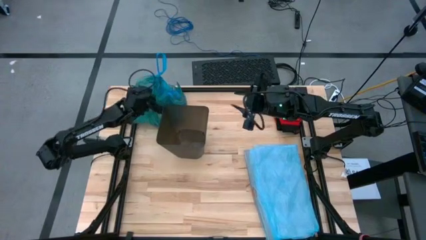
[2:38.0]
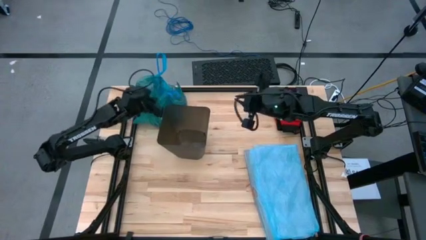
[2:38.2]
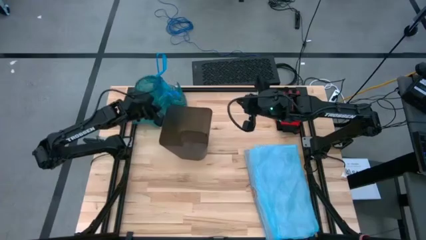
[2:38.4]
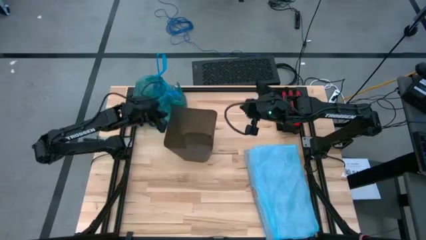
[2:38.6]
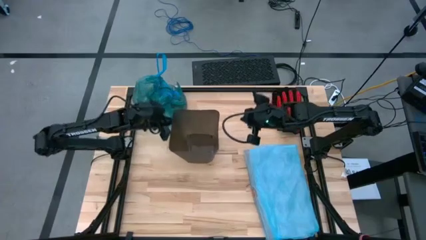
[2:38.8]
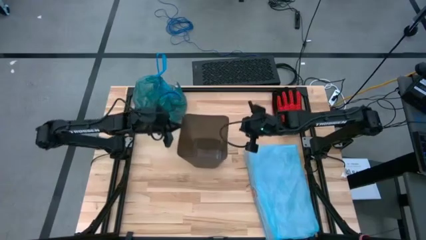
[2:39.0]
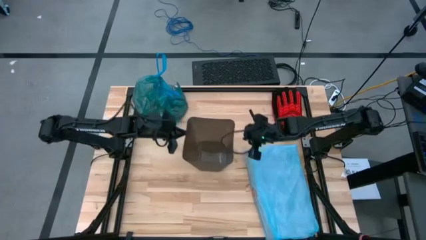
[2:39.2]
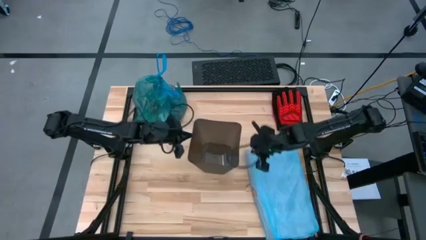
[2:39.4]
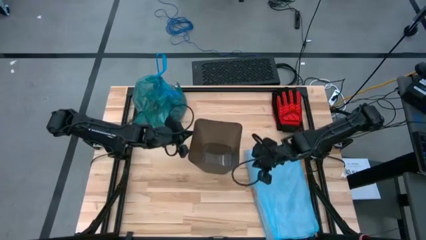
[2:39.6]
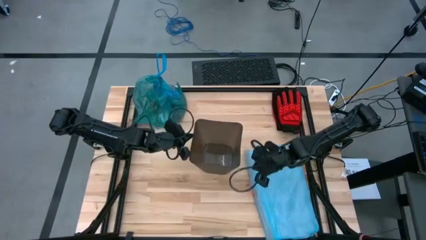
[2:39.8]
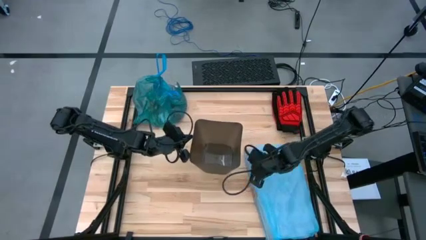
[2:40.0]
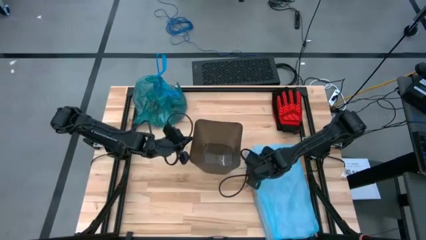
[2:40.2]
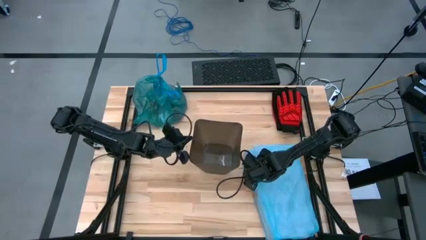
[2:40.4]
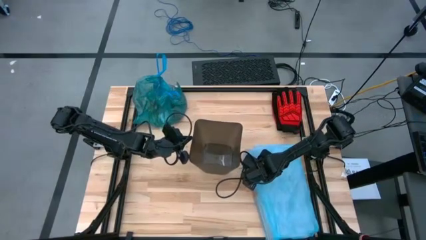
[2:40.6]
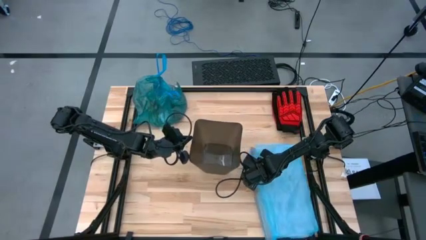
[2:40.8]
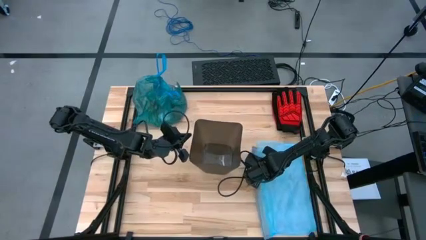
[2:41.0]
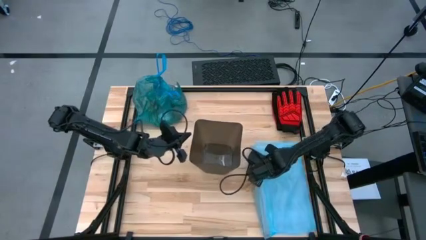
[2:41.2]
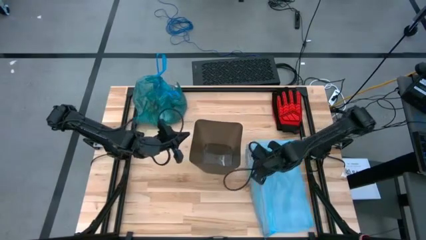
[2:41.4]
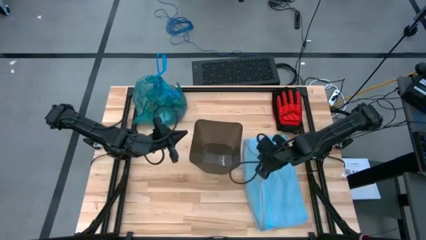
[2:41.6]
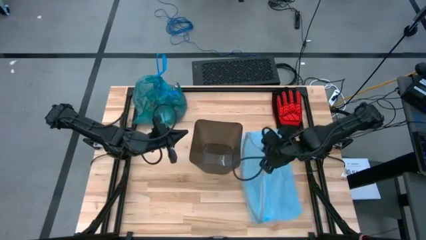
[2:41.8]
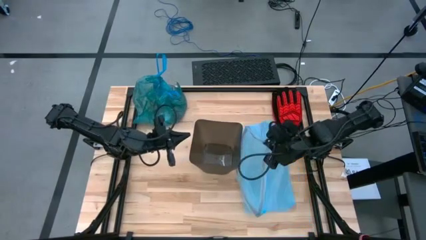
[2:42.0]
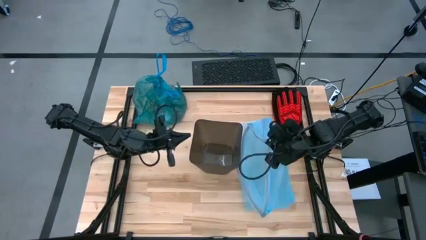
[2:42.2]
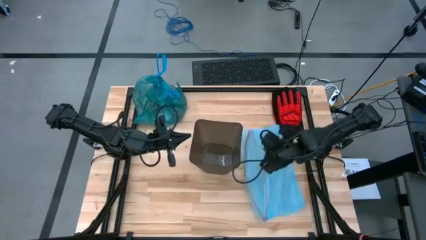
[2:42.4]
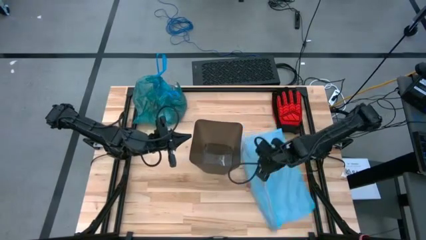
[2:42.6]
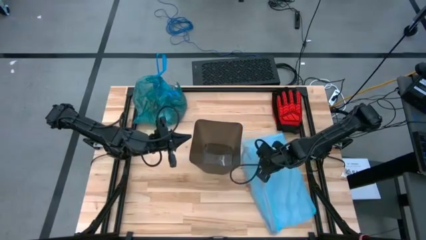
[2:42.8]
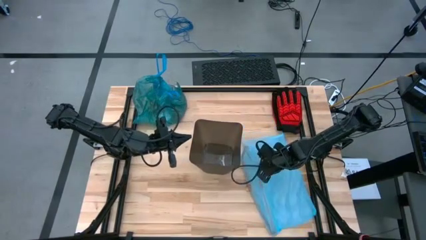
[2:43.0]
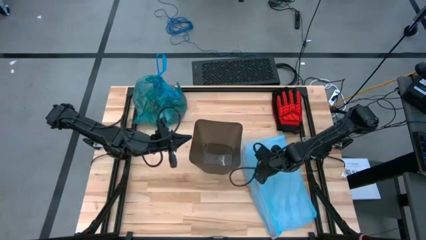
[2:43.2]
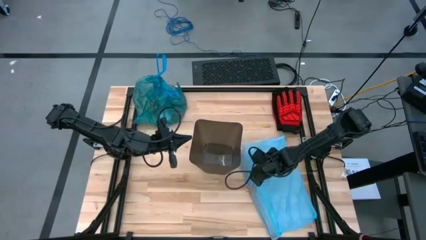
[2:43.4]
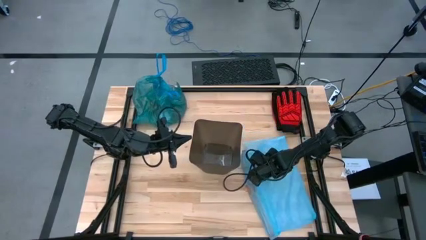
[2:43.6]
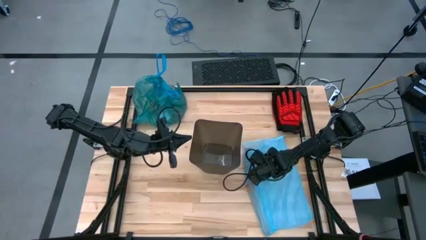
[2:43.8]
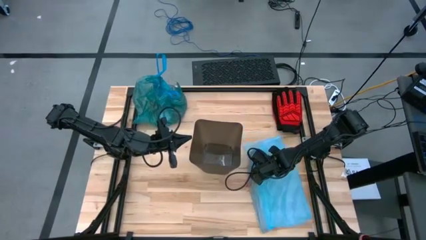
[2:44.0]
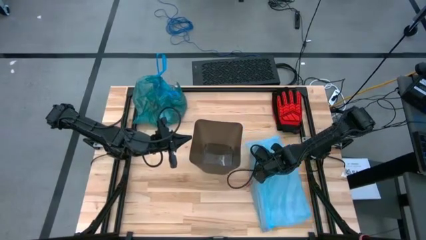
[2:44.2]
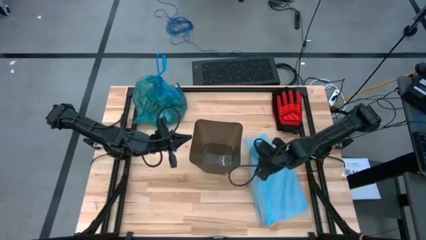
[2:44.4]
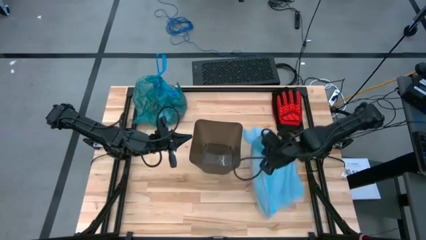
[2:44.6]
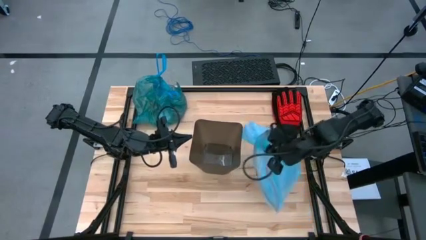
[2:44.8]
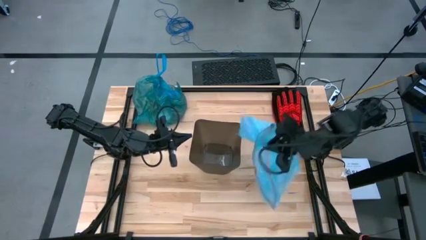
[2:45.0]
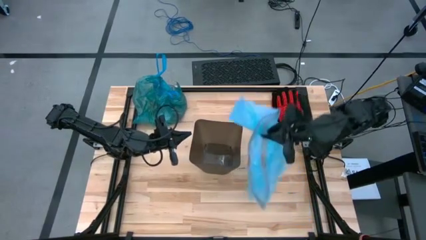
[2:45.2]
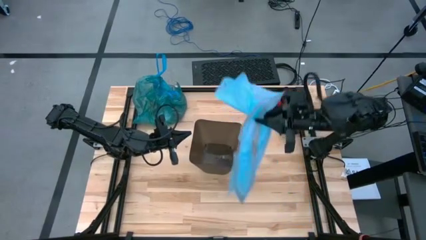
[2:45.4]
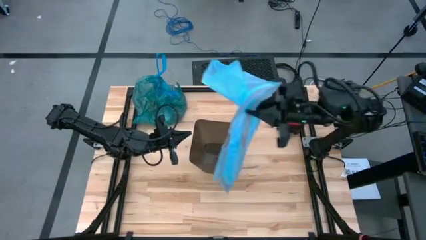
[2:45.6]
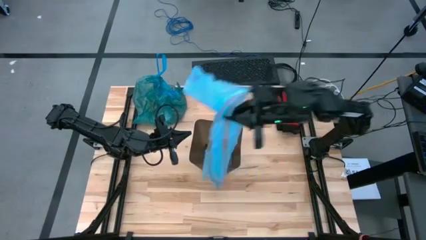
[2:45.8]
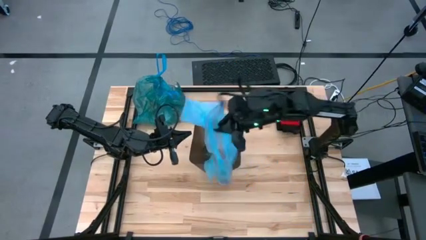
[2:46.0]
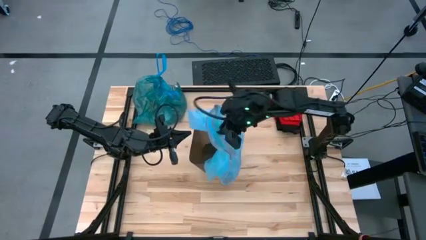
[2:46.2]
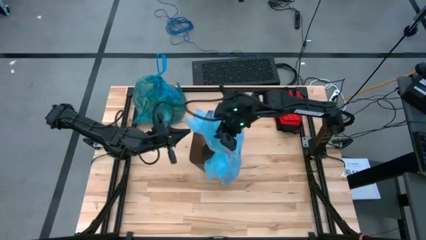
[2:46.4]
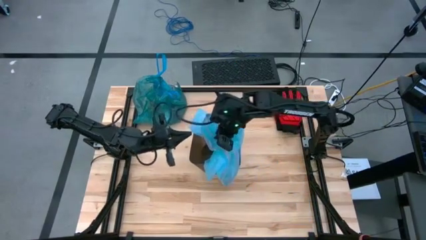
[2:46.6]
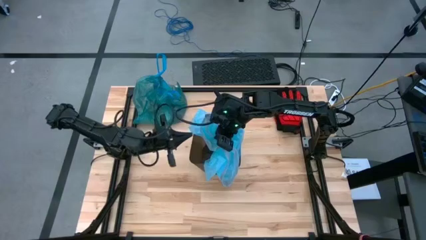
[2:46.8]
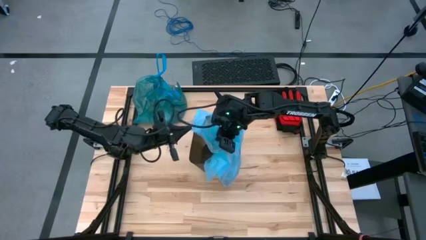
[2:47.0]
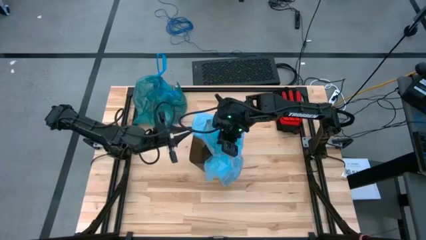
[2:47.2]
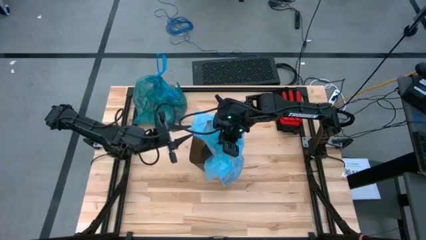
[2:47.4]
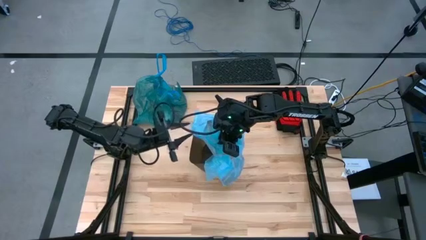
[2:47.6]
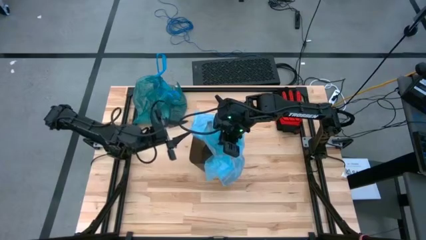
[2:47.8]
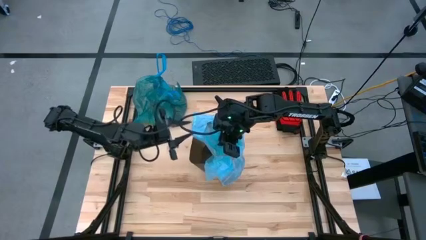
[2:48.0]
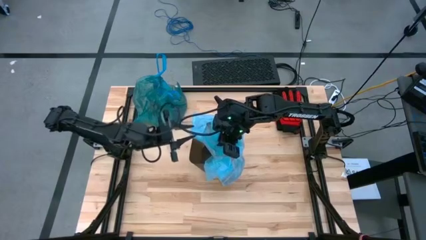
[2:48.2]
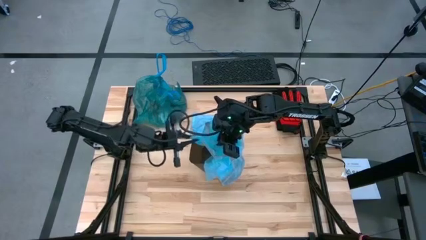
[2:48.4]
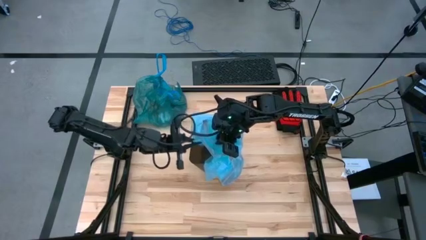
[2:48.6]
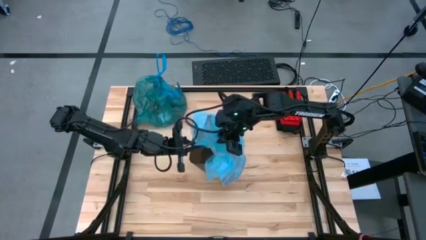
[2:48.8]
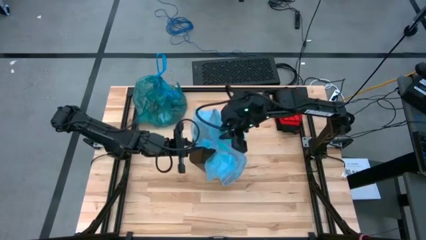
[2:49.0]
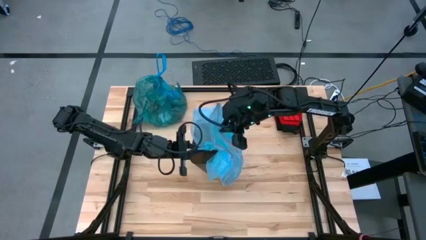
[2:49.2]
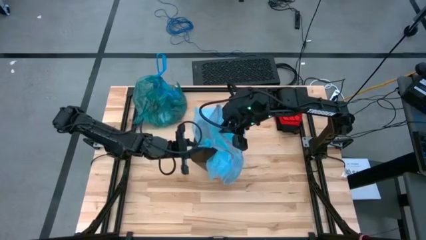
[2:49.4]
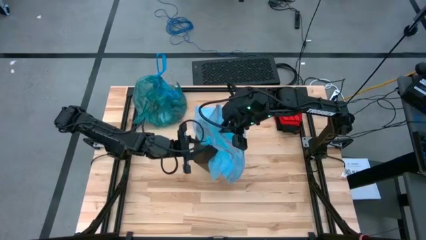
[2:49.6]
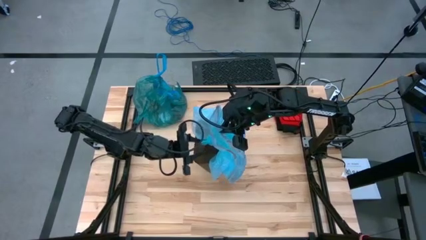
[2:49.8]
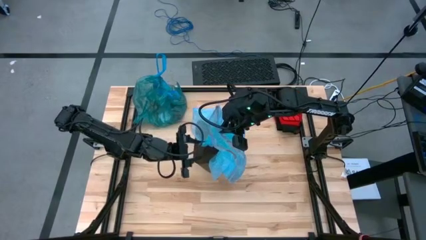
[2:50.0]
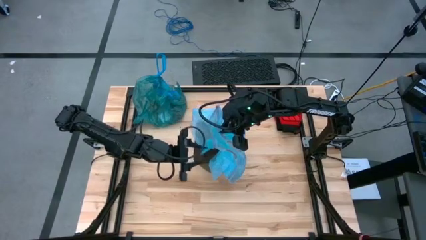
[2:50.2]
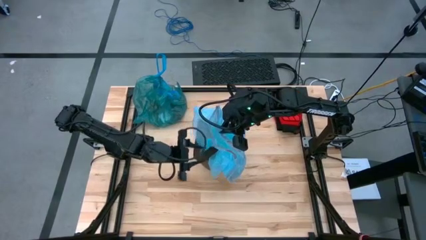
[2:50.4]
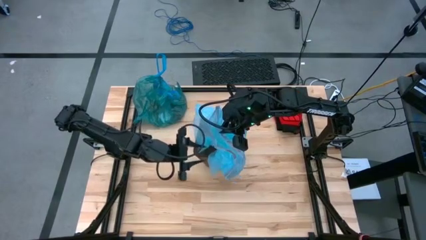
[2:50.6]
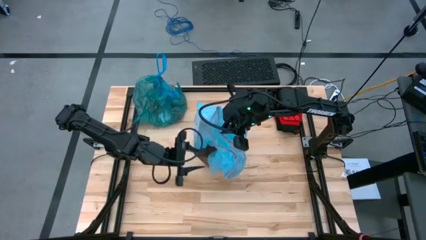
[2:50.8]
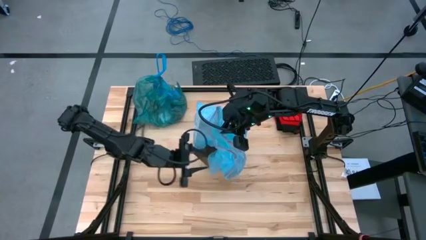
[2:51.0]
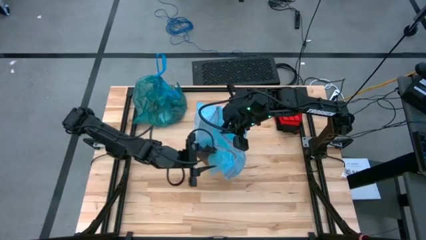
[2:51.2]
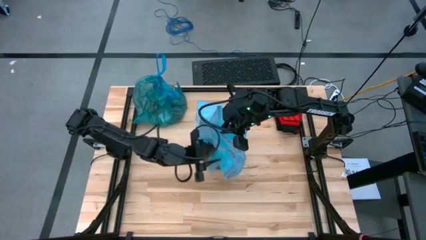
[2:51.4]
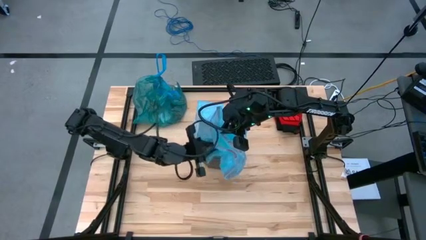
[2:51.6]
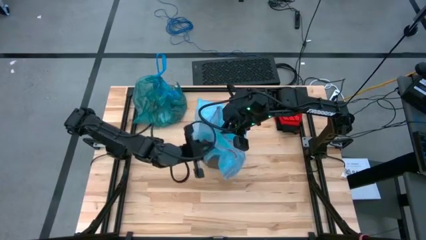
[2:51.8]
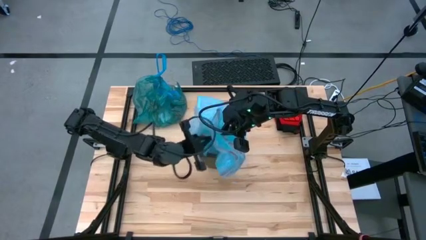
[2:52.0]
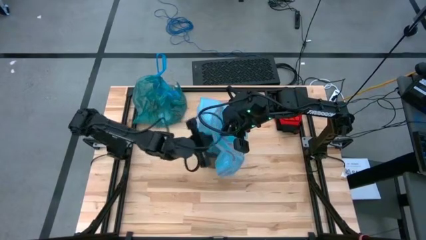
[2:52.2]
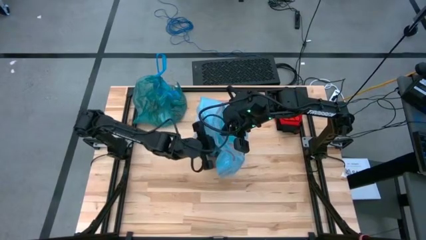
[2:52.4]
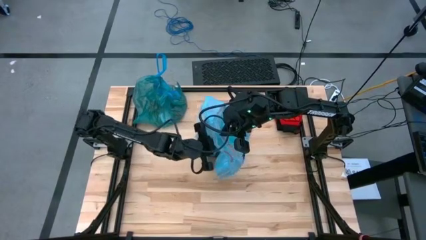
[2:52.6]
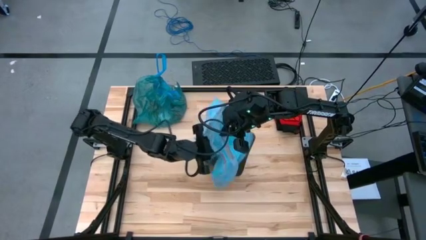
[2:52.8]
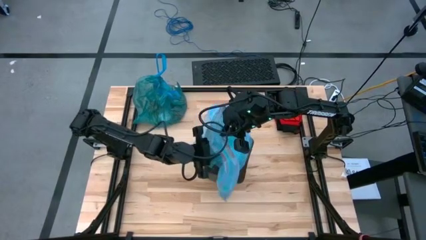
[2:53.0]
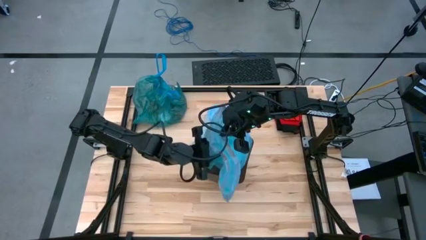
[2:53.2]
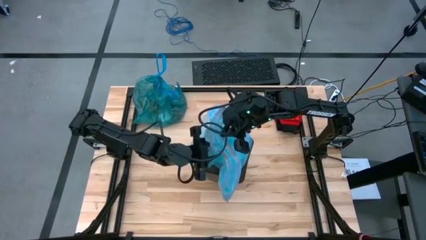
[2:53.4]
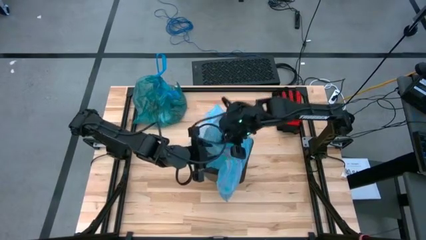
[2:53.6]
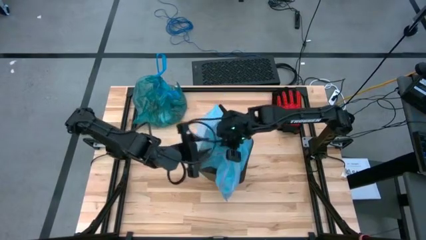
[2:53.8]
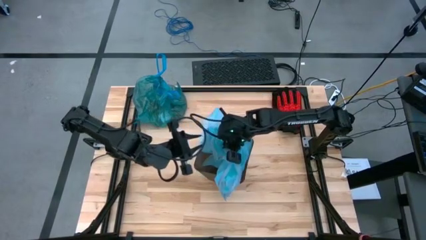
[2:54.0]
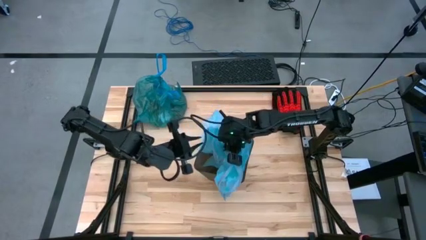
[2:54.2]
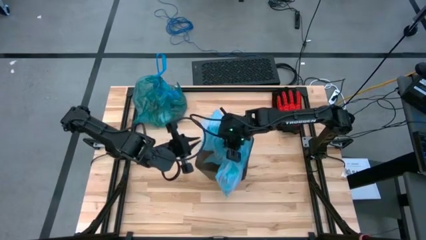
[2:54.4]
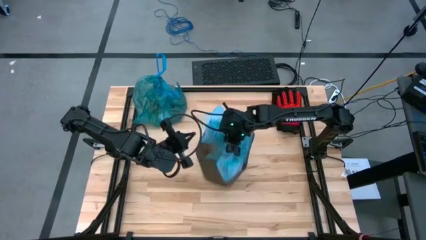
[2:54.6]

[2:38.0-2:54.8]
Task: place trash/remove bag and relplace
Insert the blue trash bag into the trash bin
